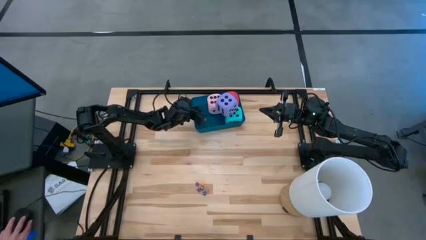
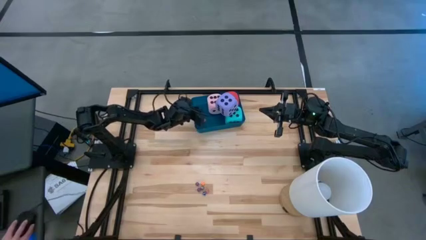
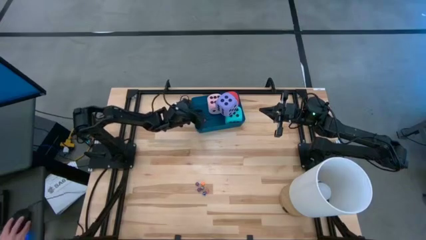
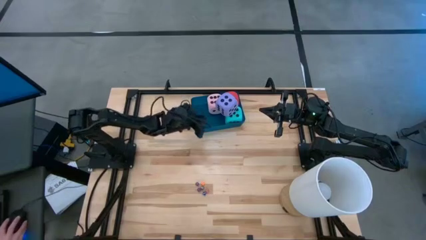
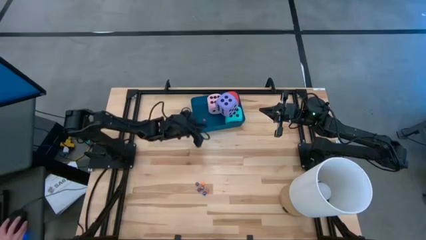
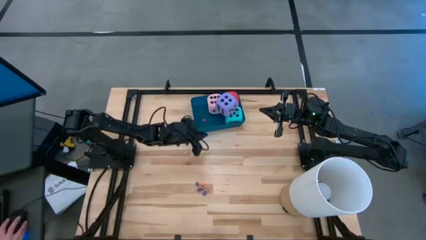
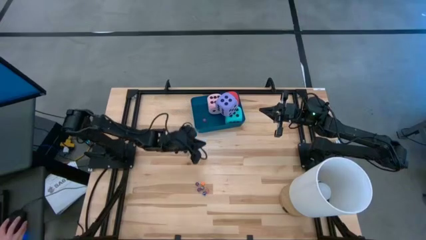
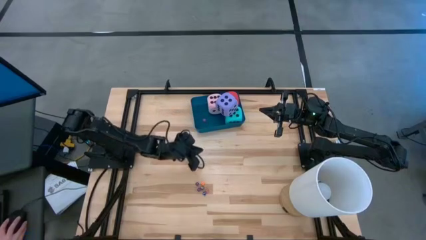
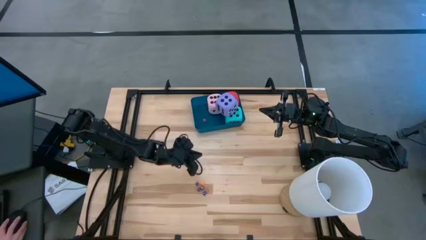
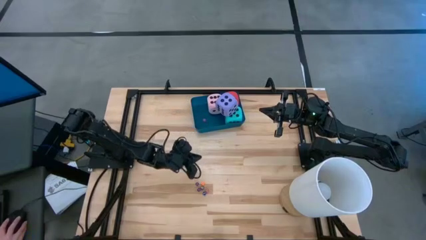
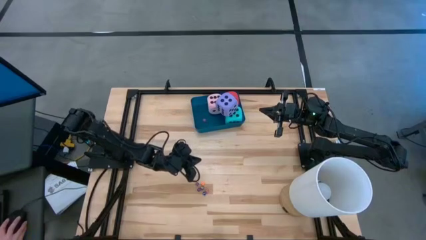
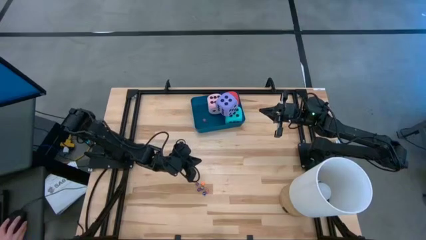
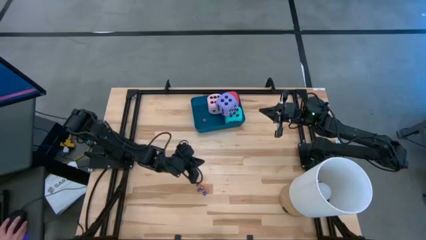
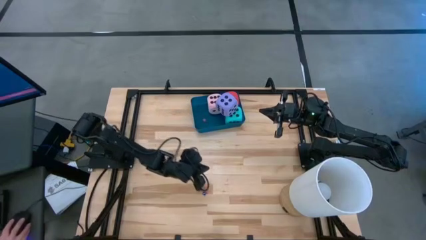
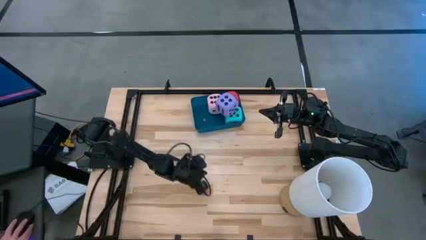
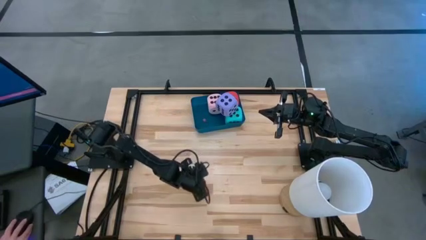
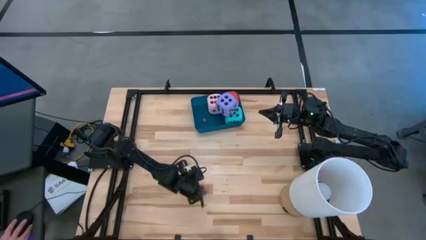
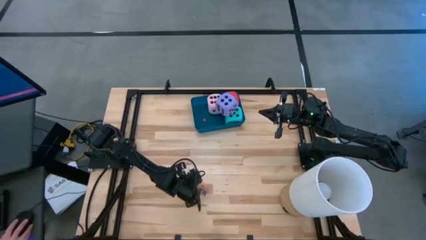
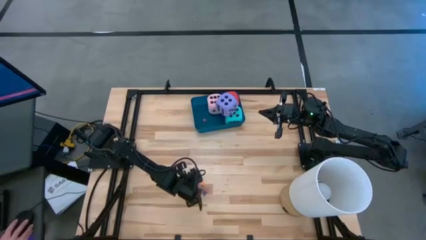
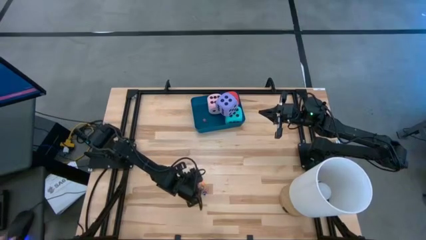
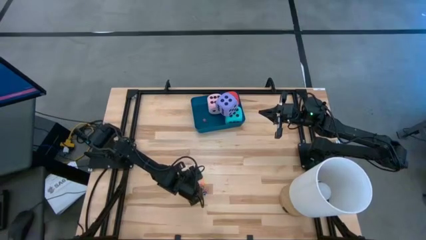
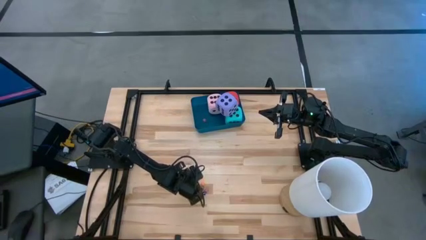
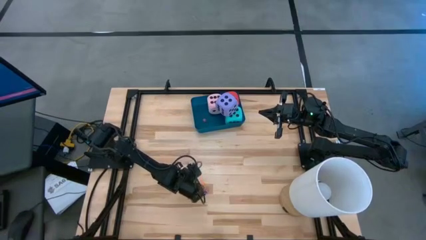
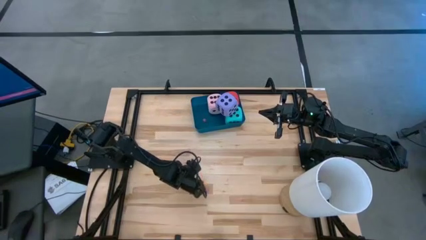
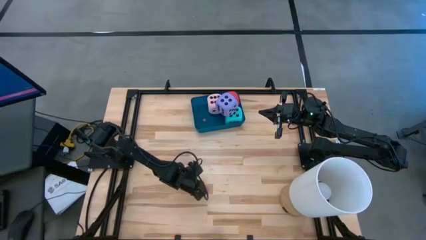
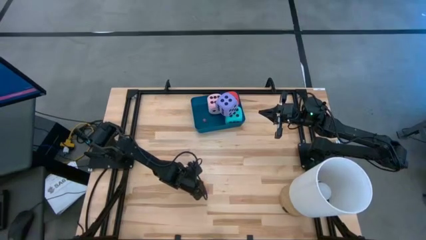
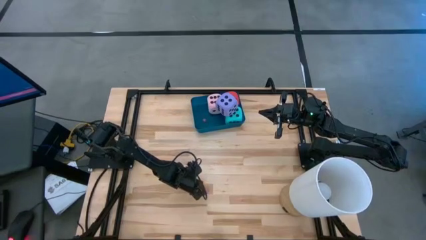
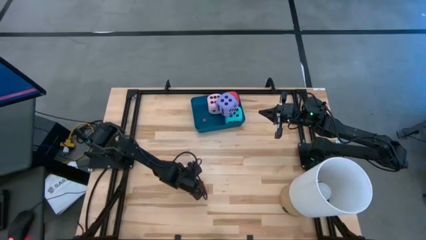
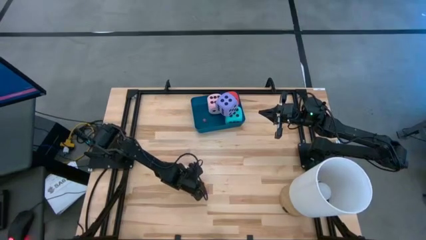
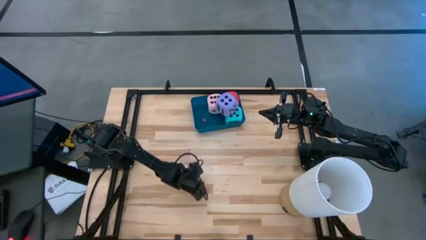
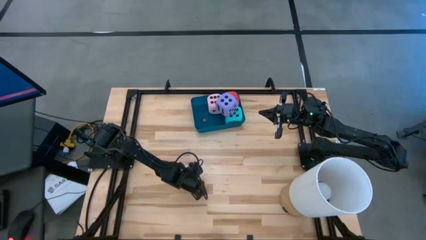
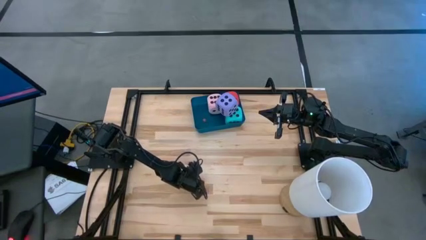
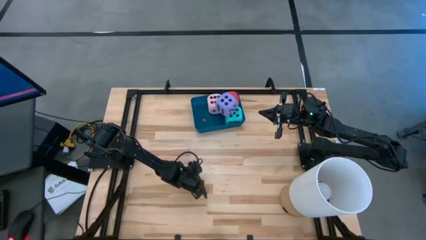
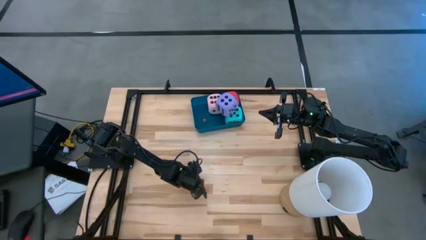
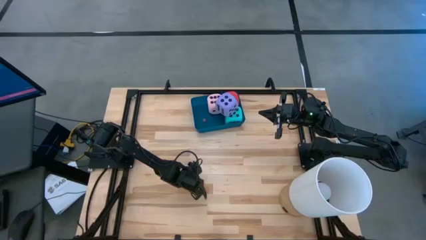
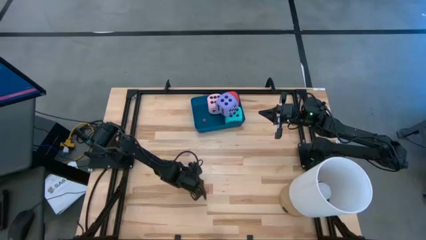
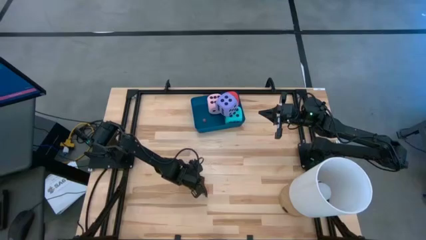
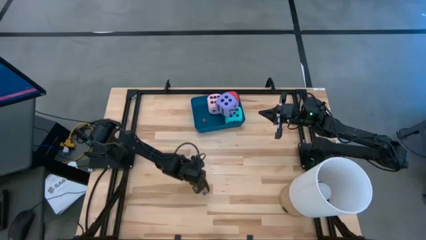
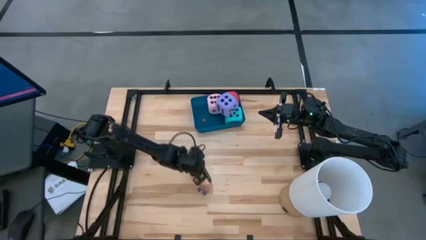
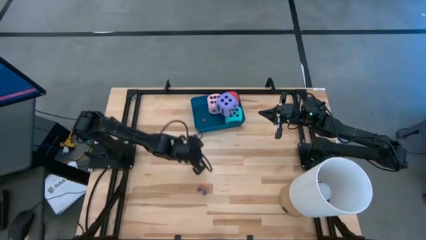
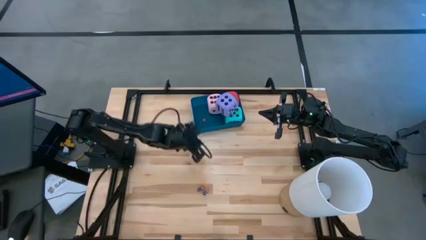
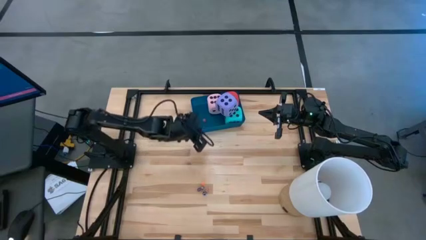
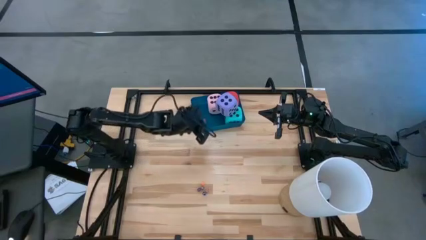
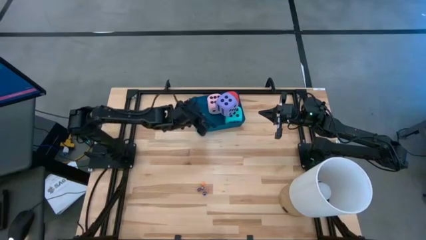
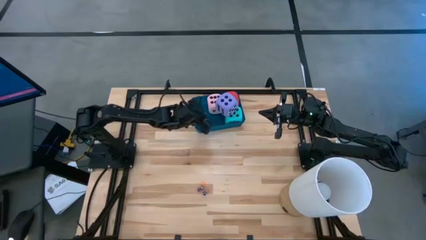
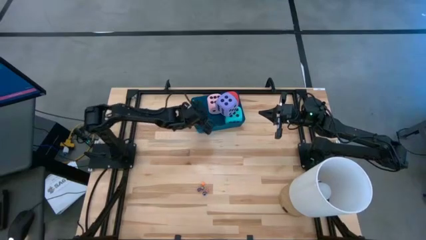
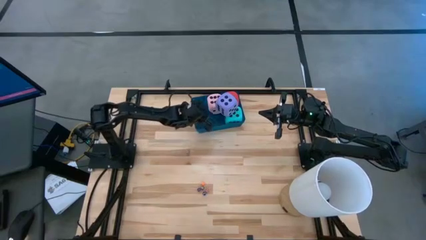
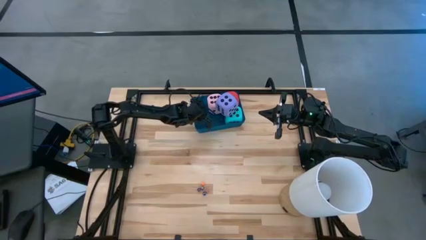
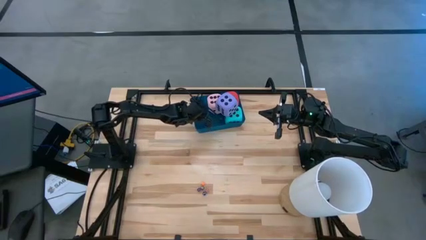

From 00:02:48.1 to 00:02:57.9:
Task: Pick & Place Dice
Put the left small purple dice into the blue bin
